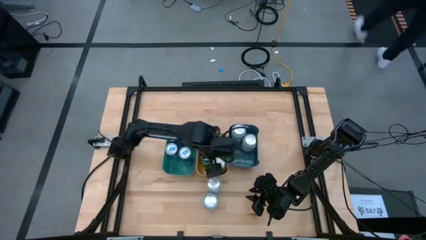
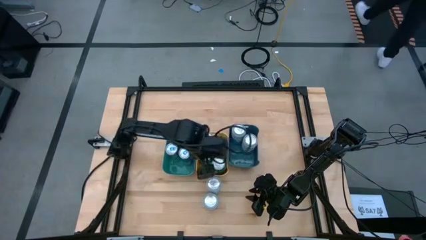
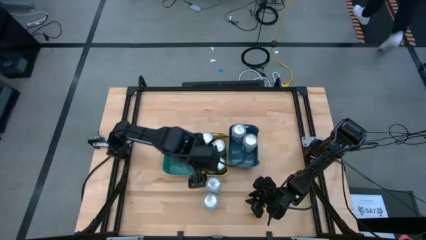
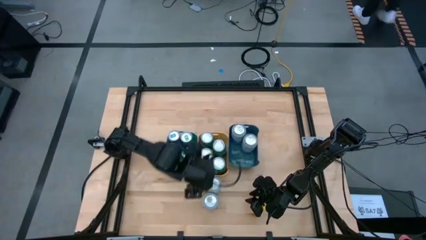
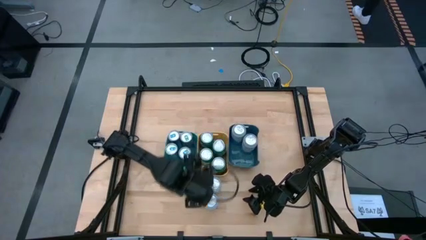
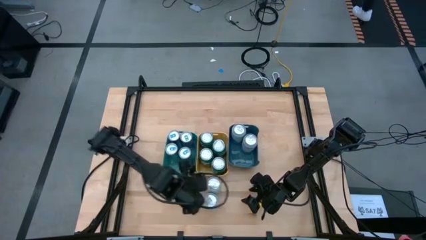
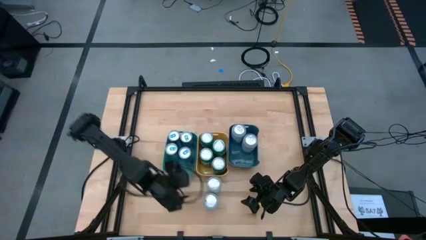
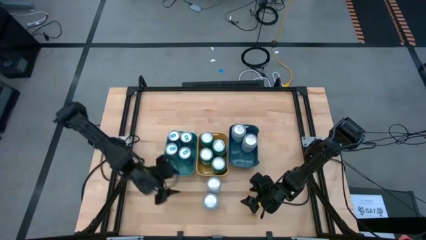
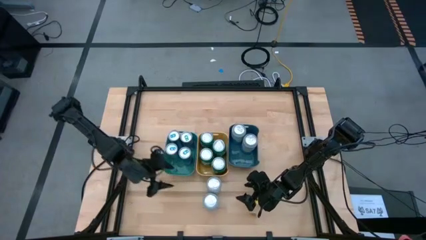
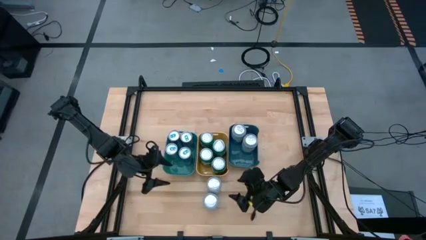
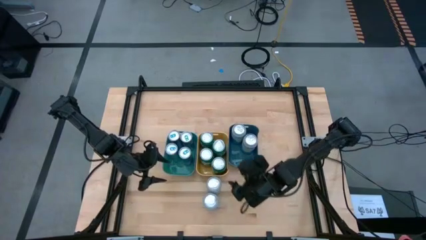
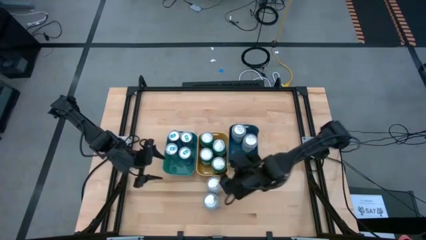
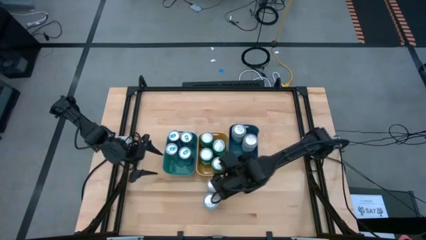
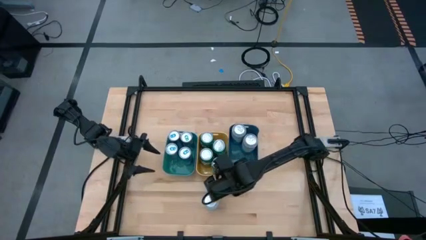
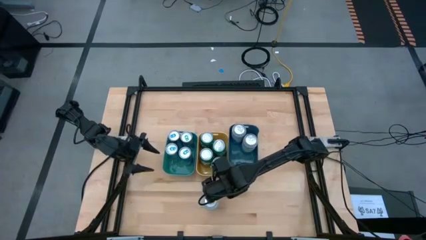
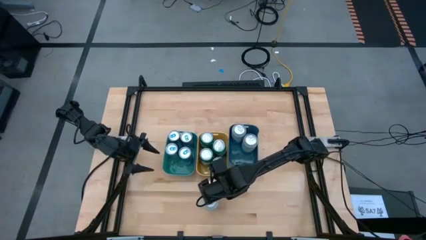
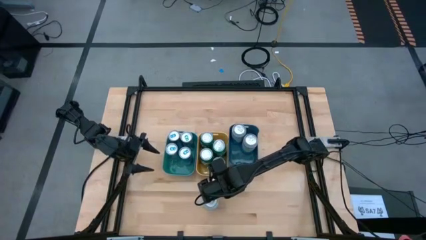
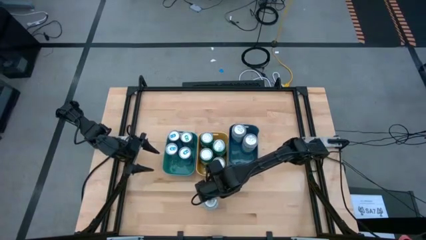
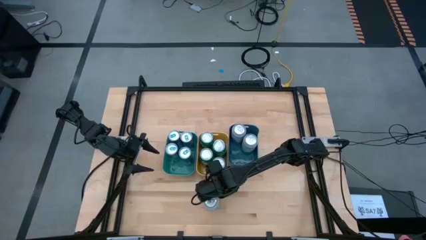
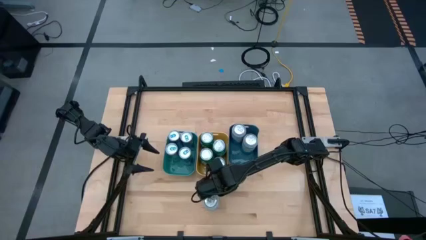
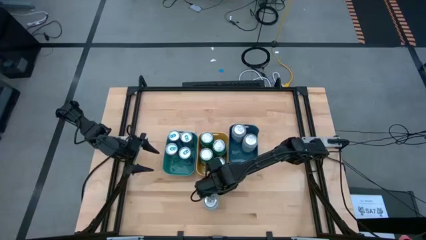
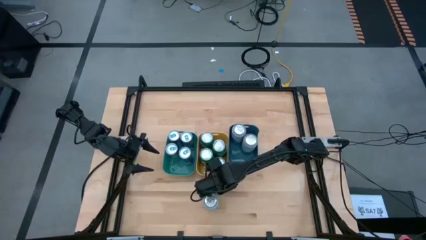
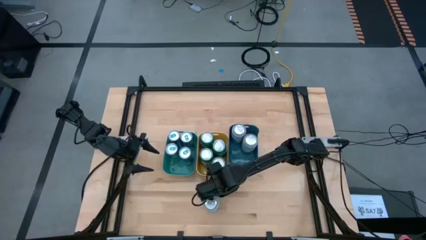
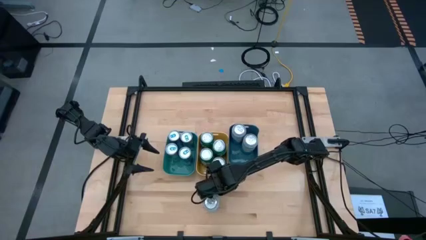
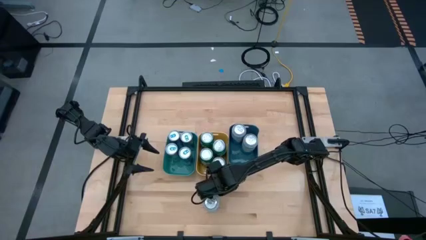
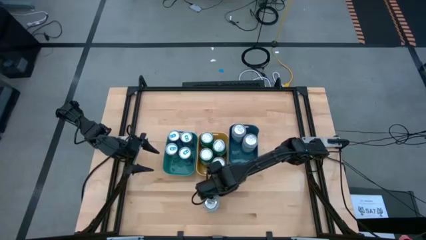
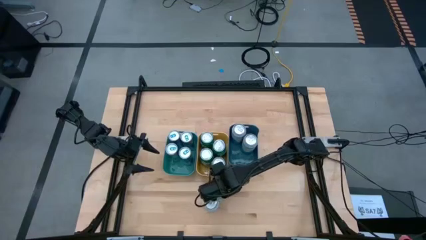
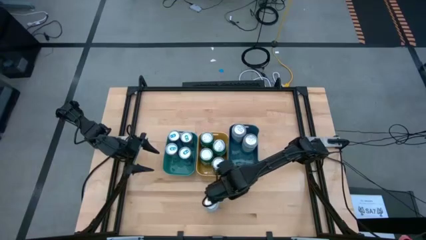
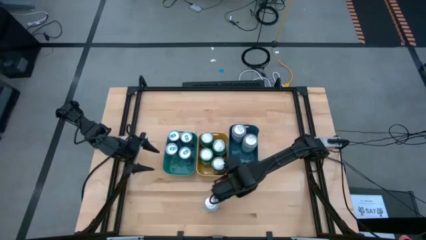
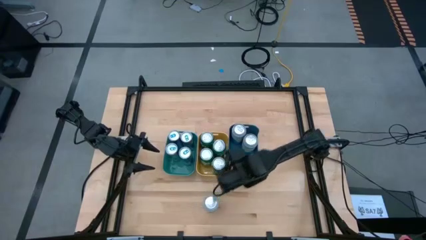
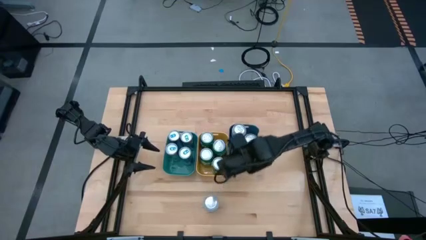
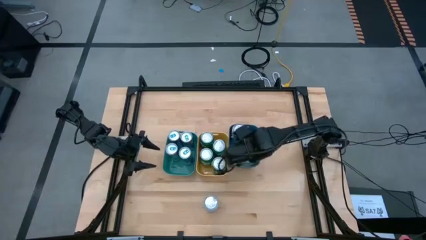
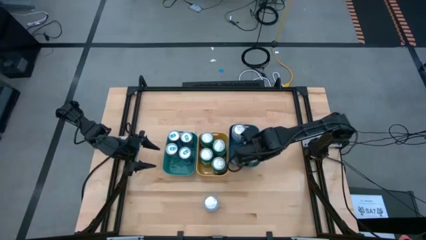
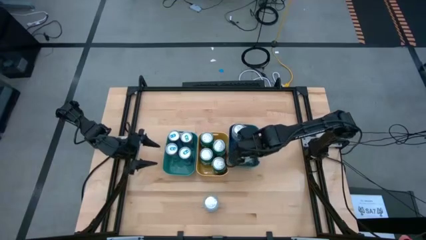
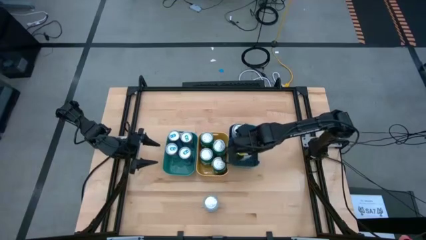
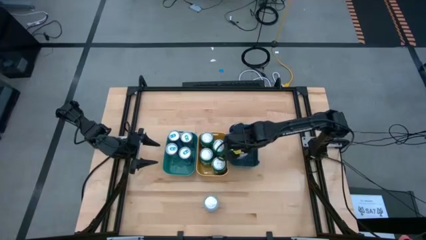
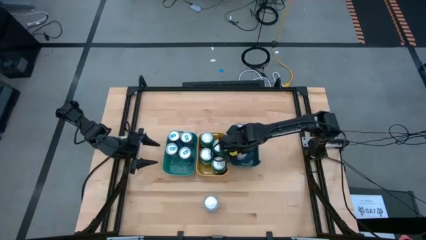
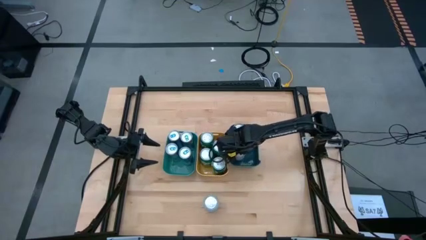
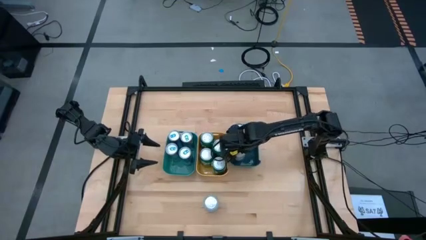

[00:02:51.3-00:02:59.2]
Task: Sort soda cans
Put the blue and white soda can into the dark blue bin

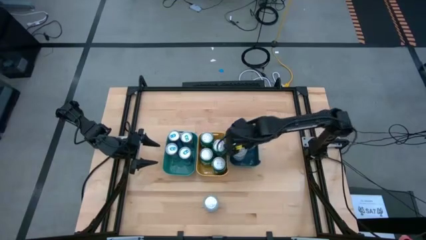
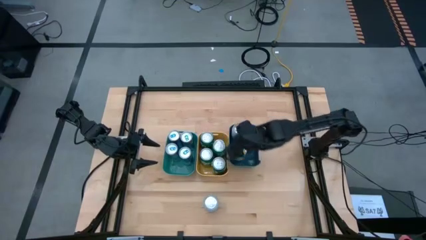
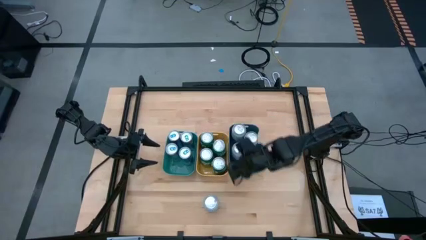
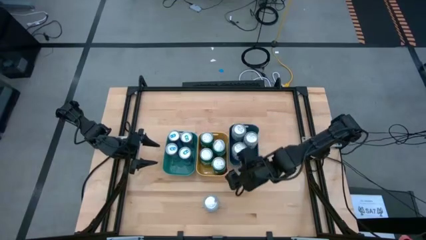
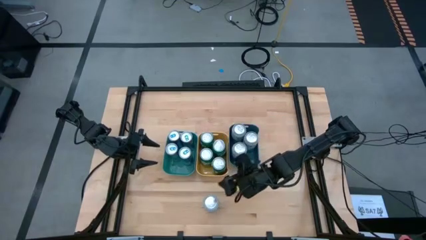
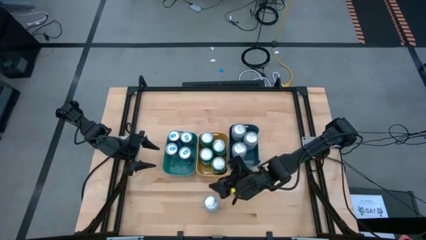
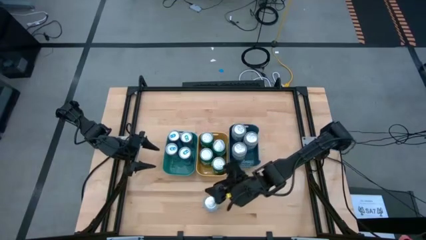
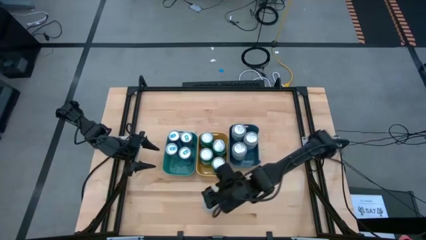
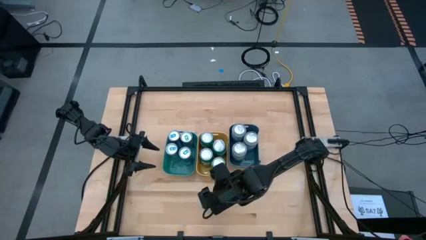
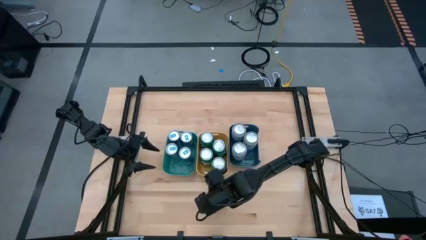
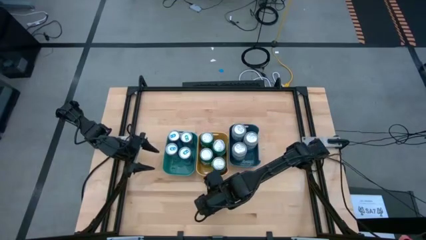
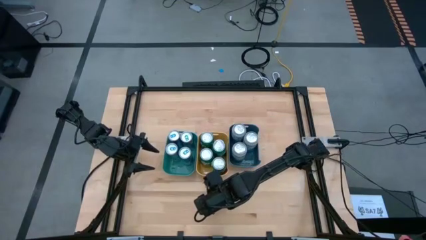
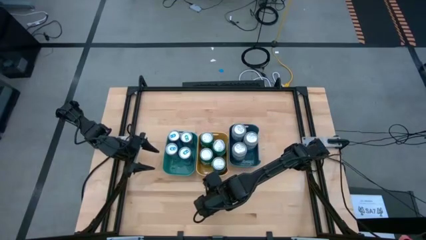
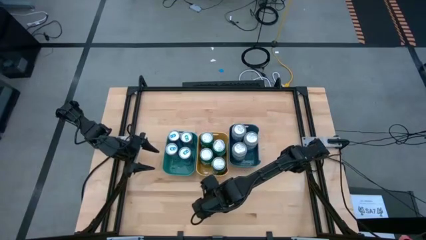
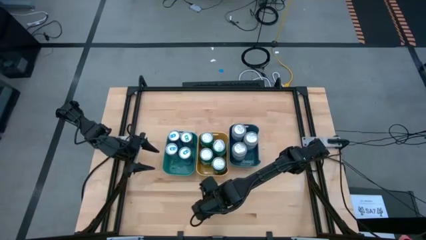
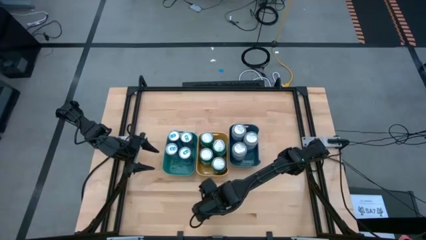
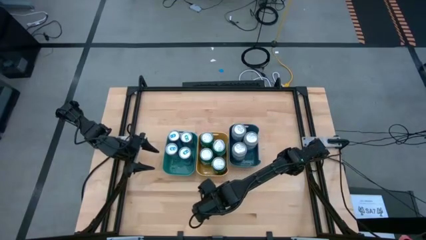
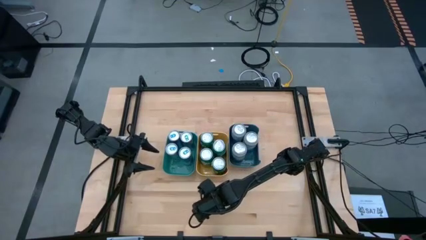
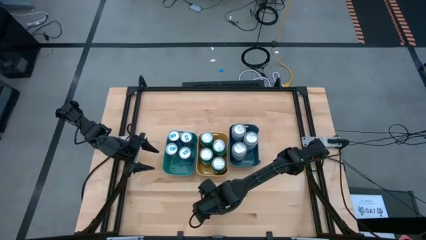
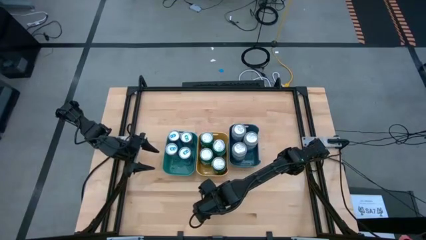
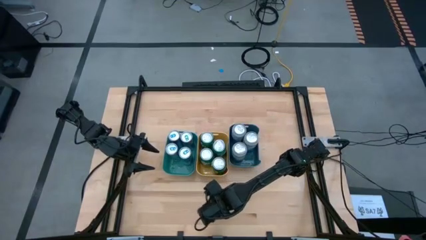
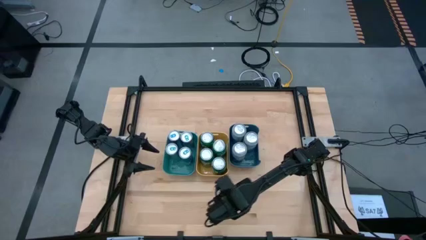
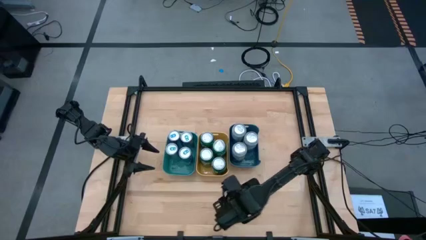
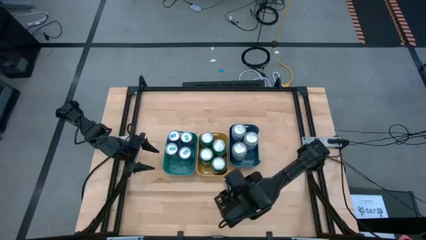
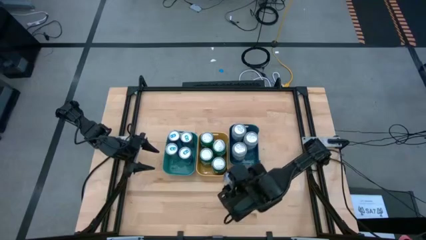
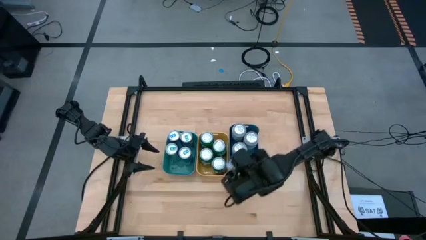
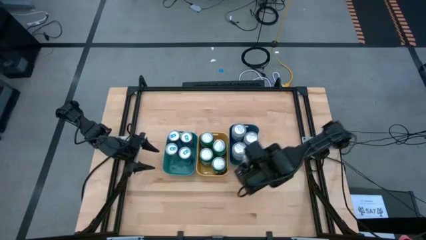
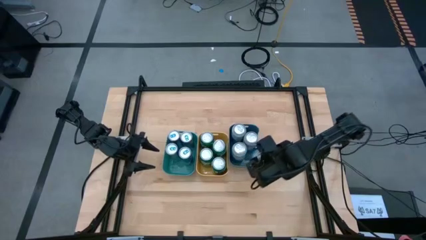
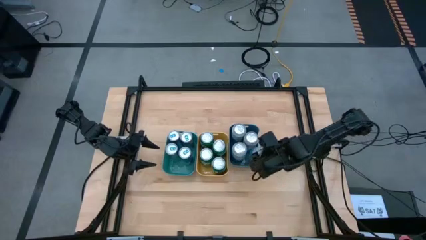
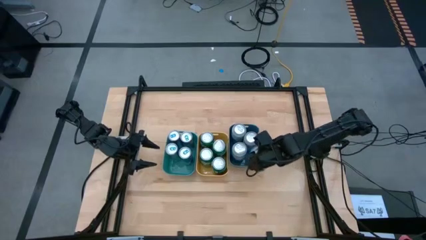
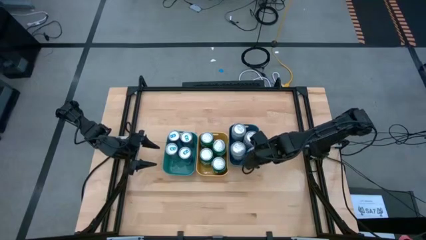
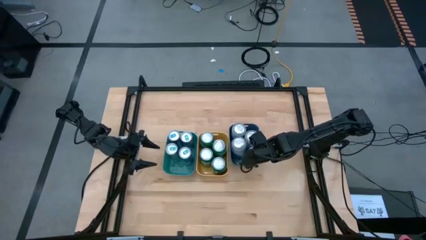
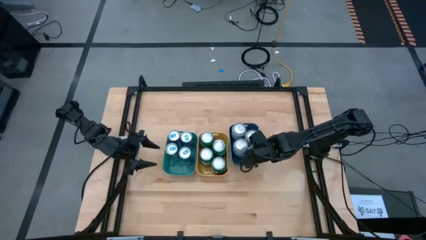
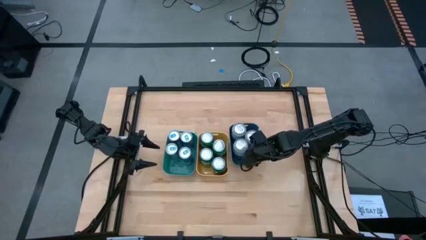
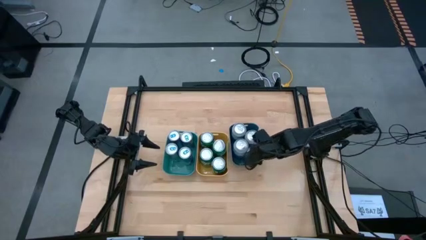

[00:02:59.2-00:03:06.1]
Put the blue and white soda can into the dark blue bin

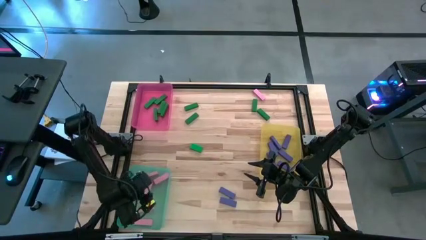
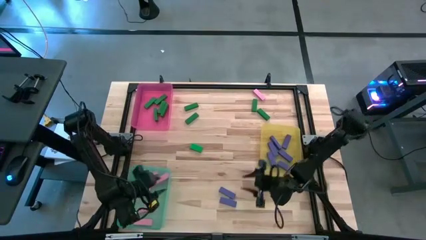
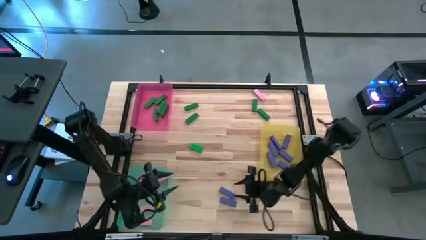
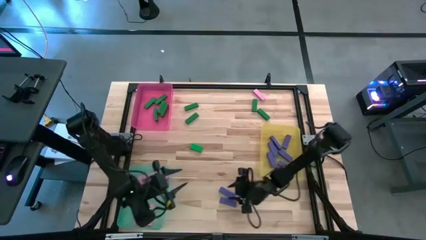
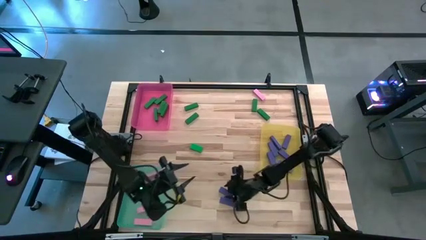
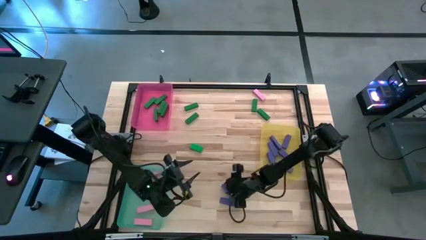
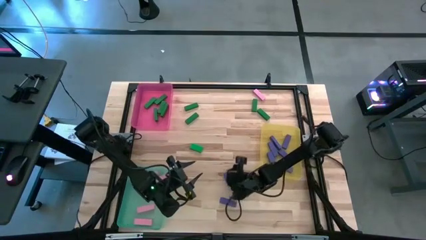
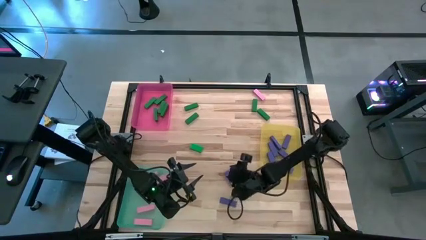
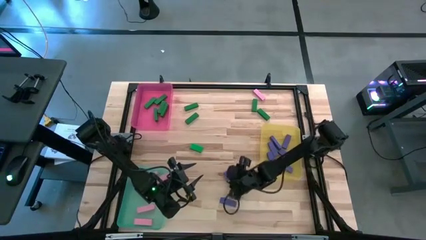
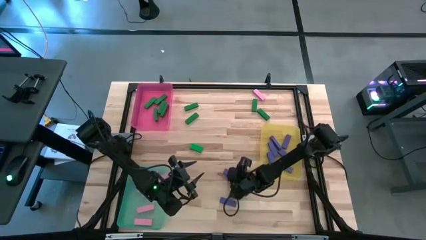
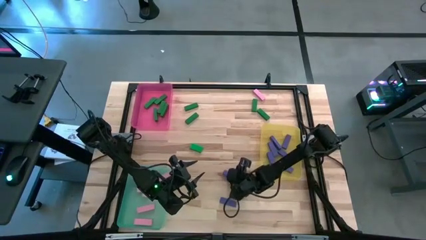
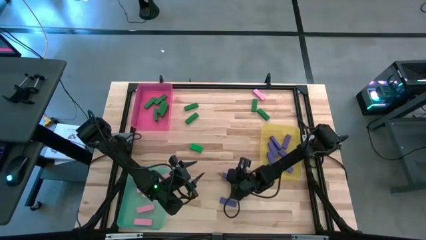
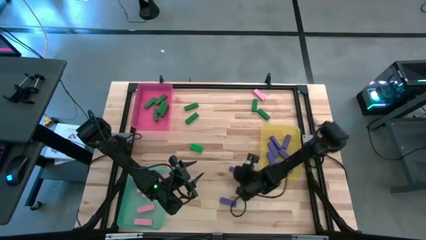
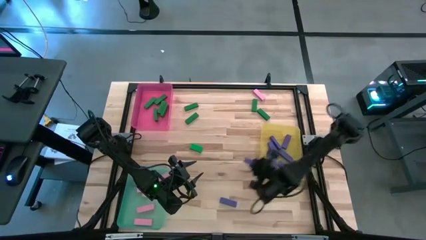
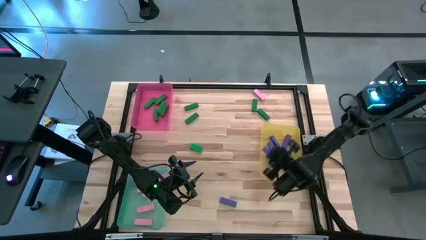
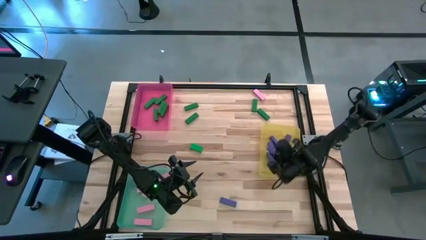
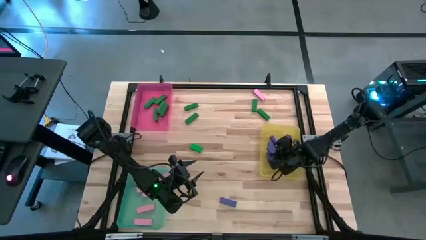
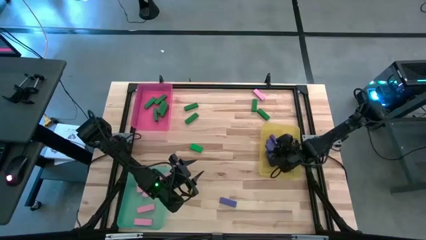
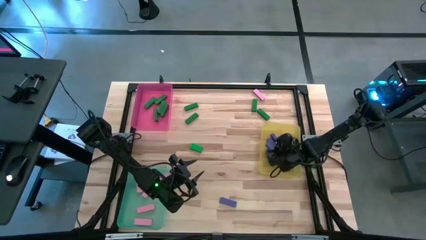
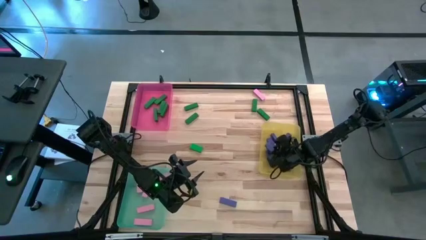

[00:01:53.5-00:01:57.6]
Task: Sort blocks
Put the blue block into the yellow bin
